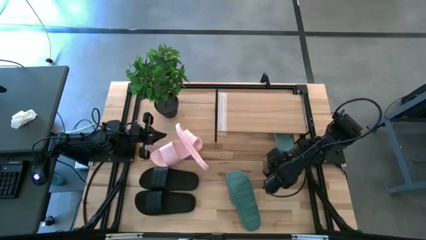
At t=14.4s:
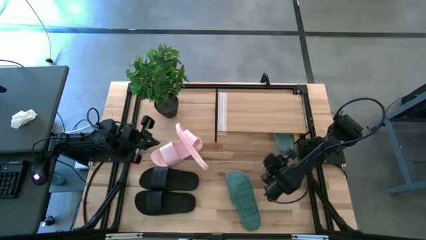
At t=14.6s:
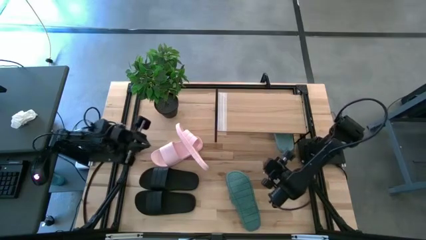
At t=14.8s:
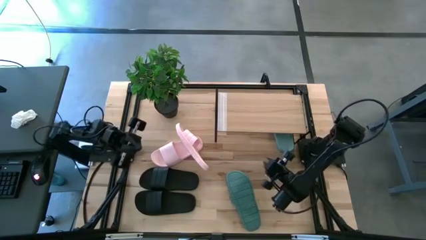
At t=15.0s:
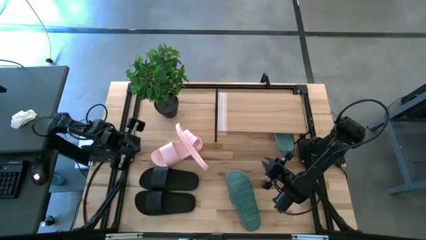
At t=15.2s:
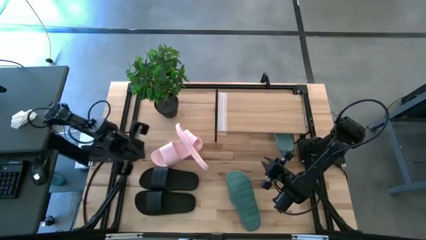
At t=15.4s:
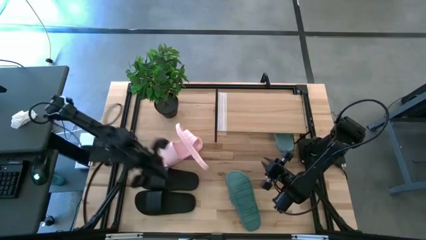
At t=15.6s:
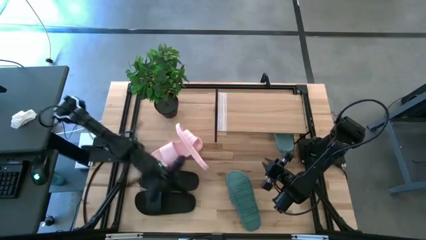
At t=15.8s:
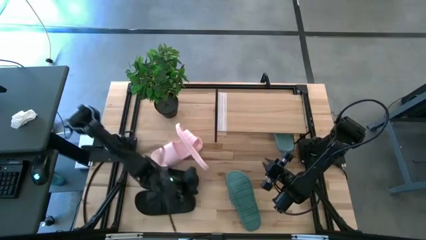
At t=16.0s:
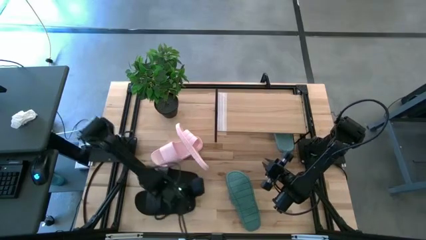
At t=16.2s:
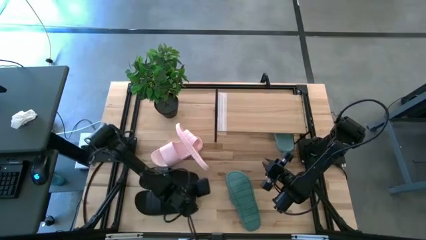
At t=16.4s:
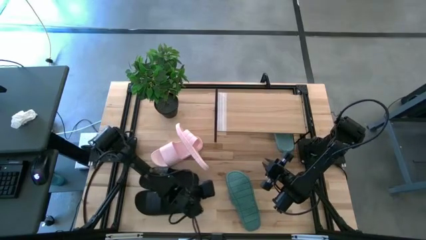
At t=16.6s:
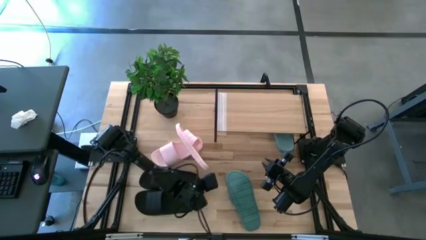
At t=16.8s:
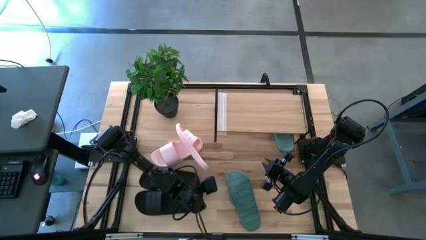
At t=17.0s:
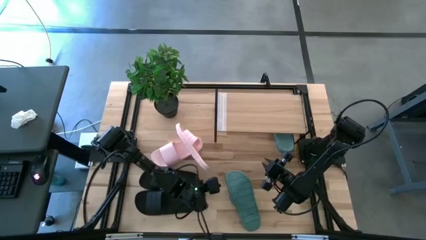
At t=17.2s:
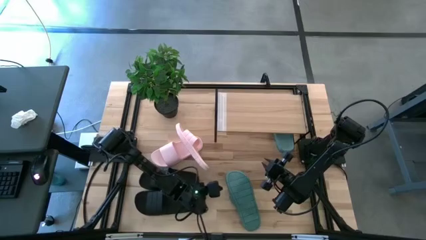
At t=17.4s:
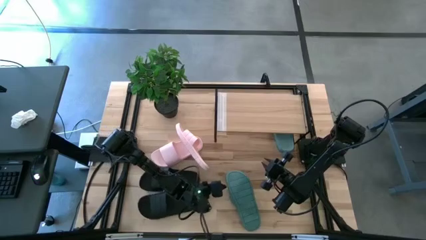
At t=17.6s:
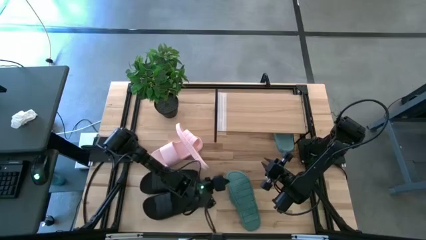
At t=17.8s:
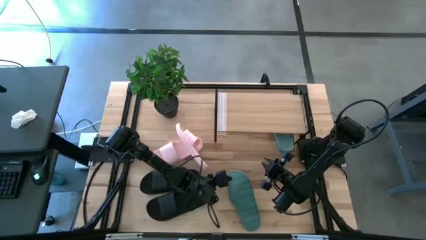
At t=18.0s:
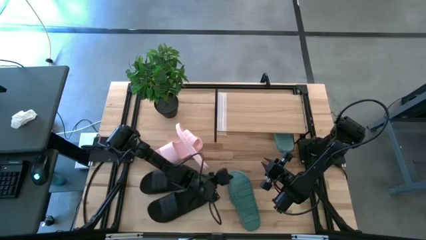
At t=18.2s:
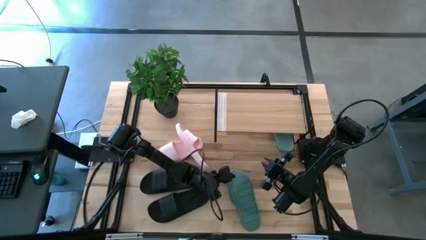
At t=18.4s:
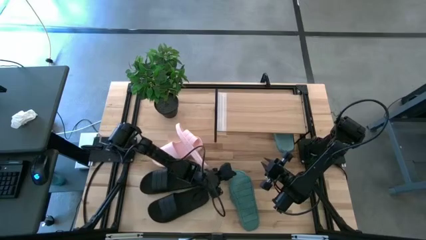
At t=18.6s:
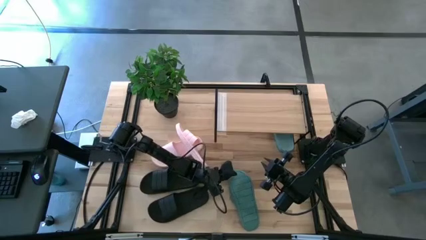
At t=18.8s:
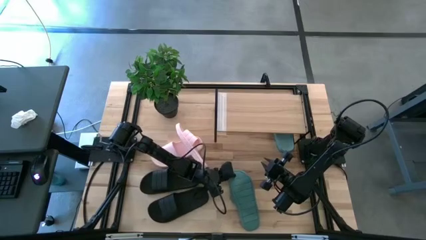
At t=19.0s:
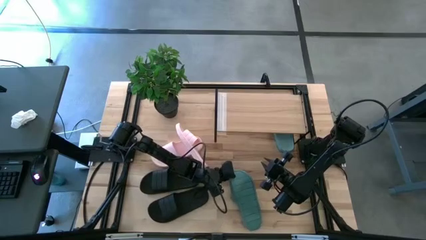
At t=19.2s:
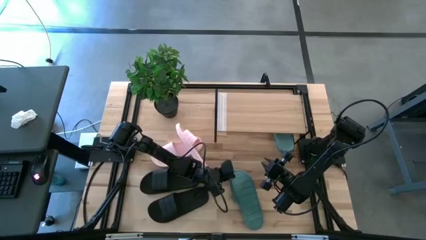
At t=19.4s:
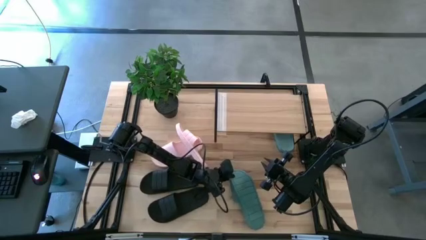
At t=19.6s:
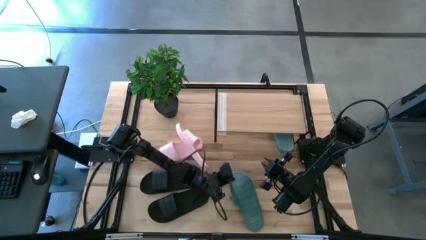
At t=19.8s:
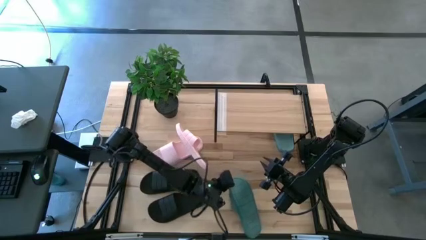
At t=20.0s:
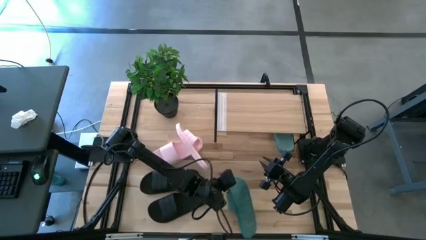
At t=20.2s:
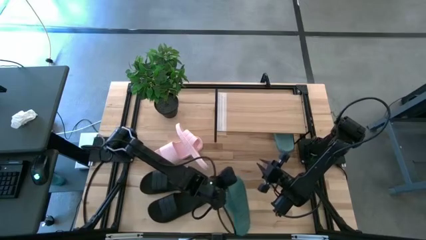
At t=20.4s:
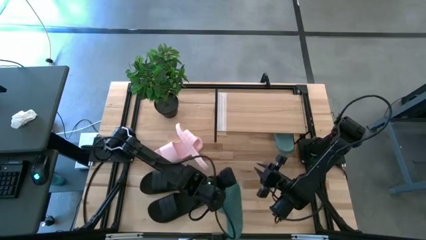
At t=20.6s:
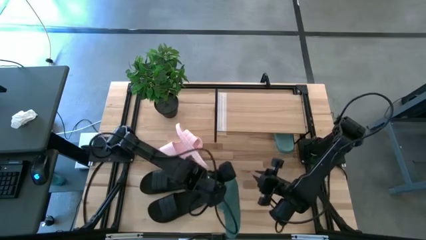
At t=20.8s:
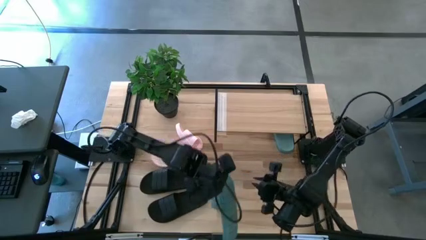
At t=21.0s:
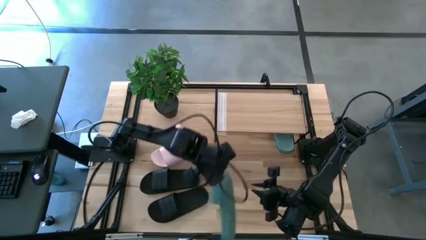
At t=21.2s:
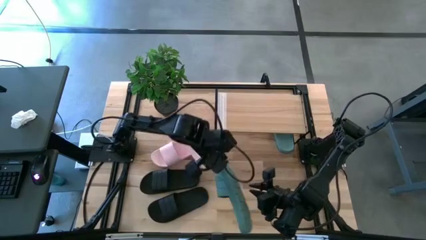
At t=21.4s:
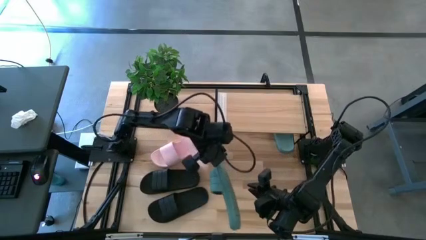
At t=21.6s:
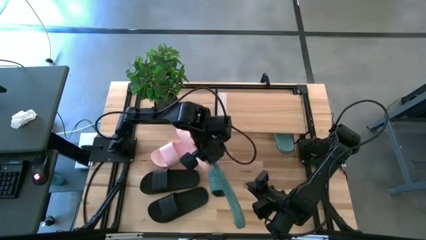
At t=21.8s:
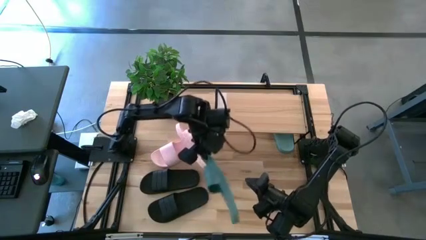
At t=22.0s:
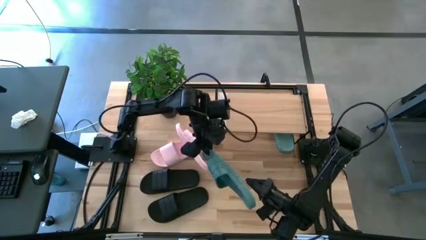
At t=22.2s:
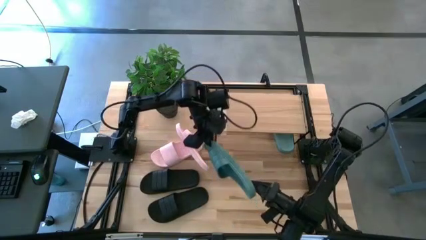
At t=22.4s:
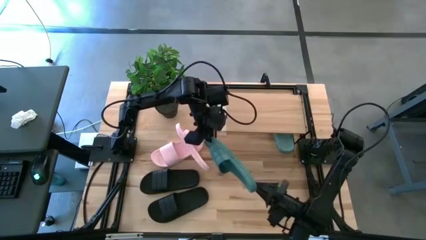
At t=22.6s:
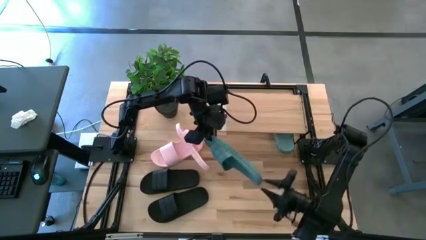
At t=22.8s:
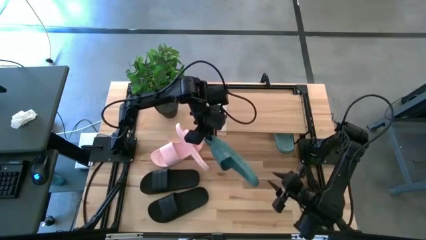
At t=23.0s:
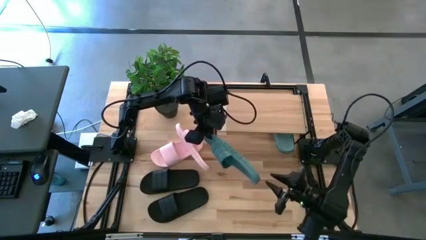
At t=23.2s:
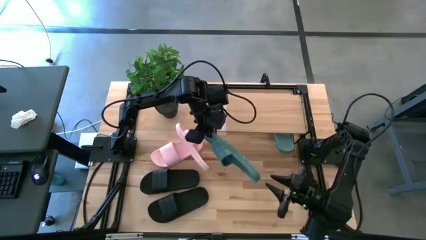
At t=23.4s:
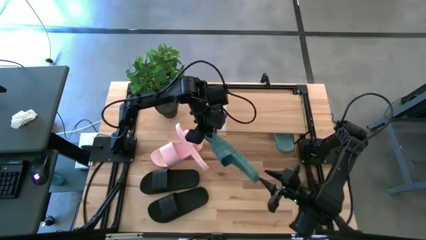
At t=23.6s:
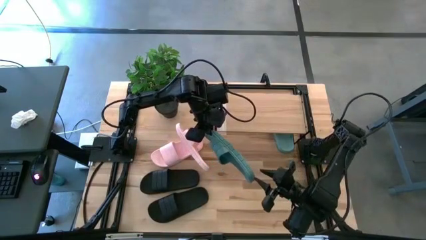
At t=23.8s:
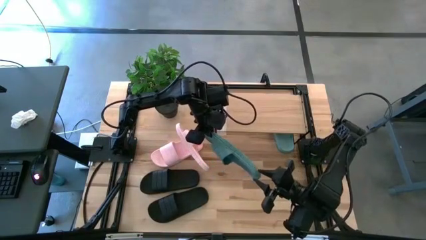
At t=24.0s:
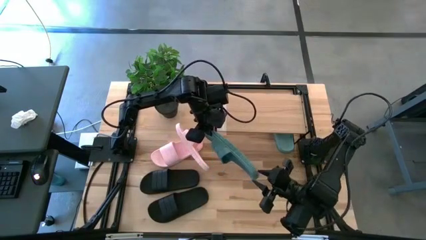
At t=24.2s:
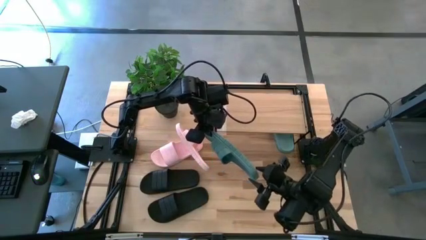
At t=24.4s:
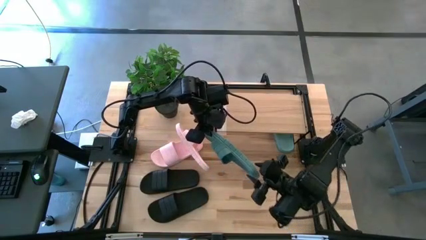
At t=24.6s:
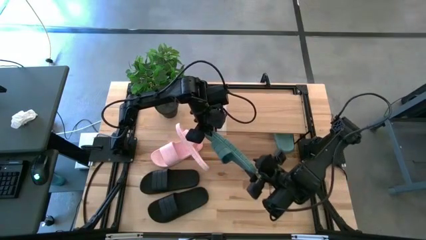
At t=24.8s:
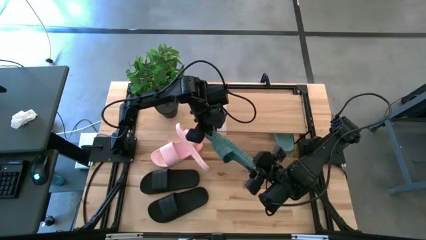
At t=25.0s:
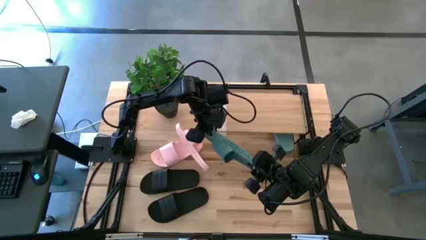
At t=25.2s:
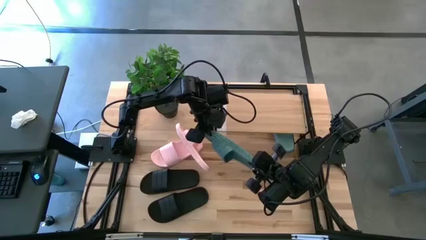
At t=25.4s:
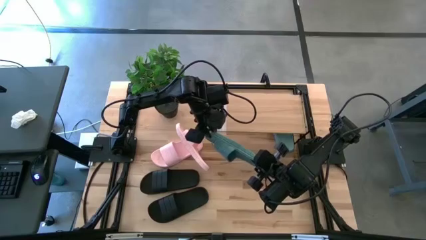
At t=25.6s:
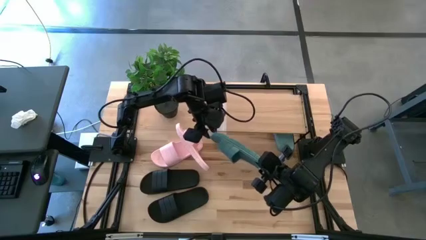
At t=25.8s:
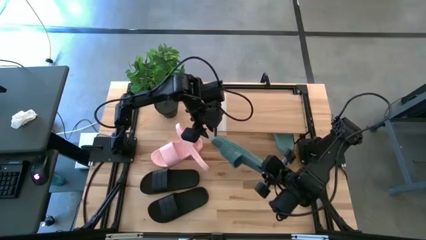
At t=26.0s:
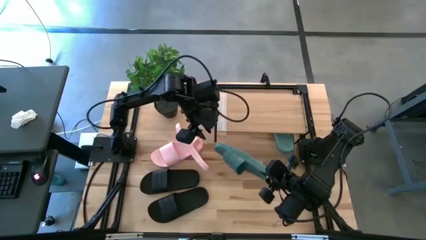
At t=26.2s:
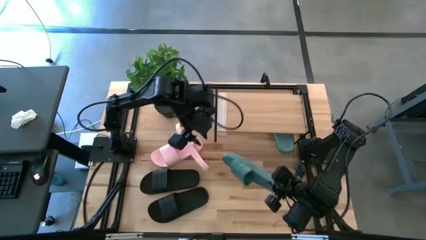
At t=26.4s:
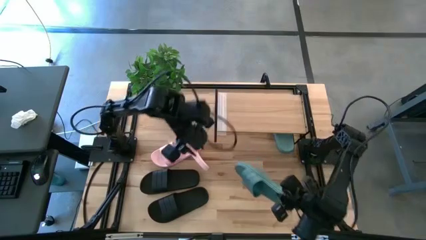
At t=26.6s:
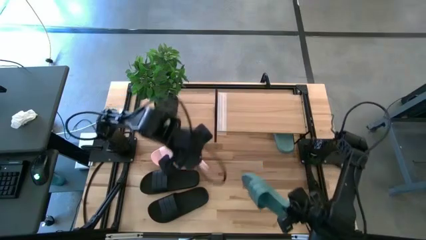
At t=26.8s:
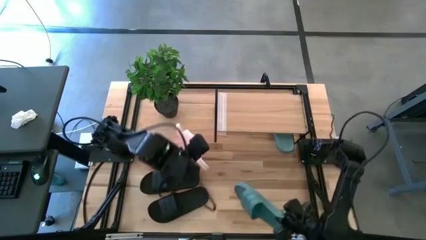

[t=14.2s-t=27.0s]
Task: Pick and place slides into the shelf
Put the green slide under the shelf
